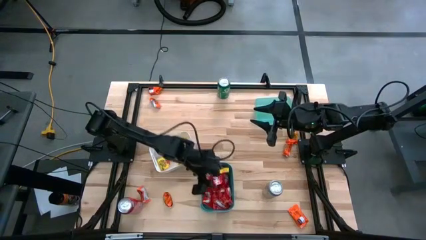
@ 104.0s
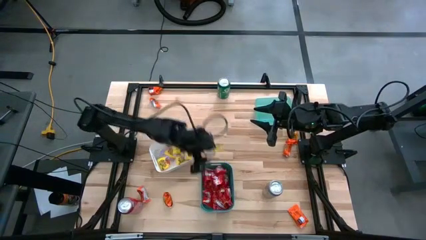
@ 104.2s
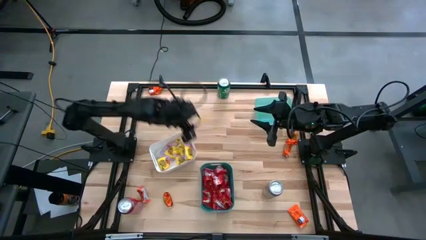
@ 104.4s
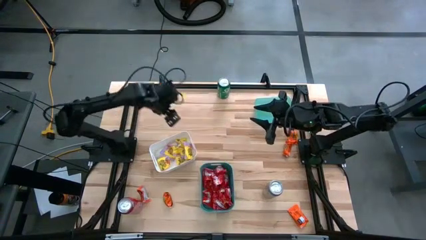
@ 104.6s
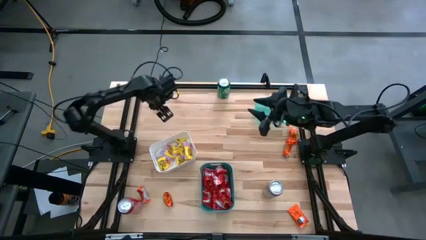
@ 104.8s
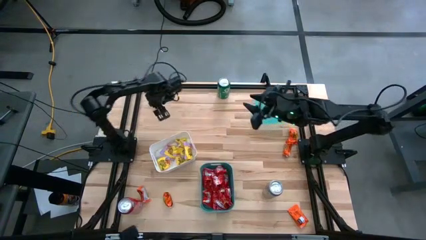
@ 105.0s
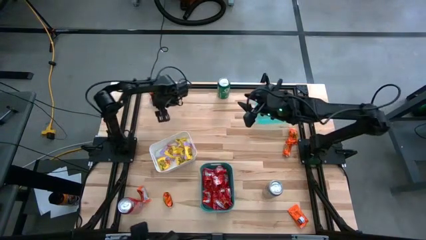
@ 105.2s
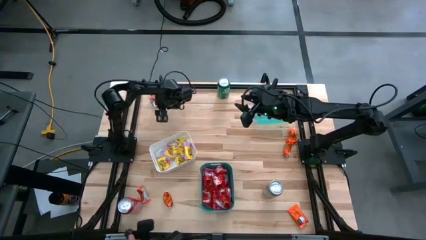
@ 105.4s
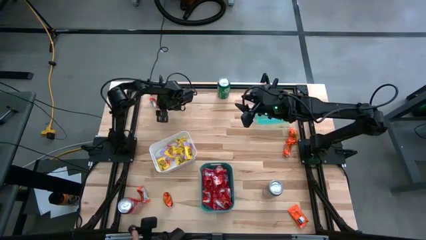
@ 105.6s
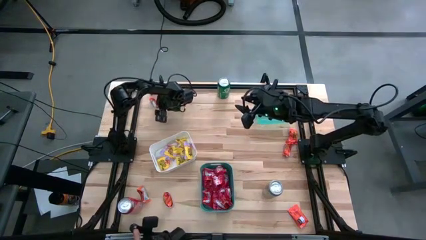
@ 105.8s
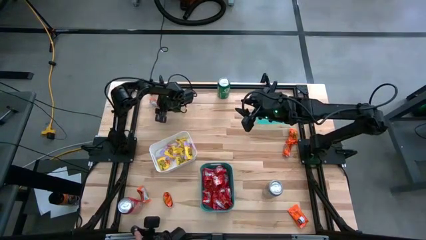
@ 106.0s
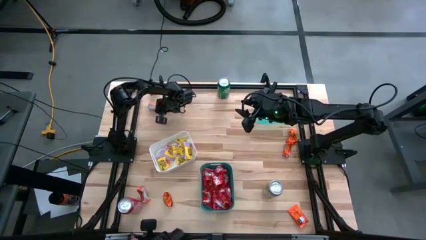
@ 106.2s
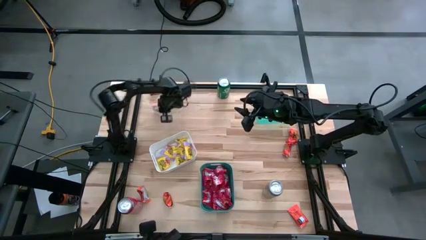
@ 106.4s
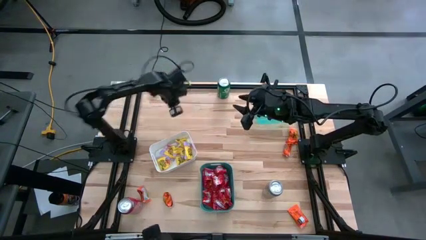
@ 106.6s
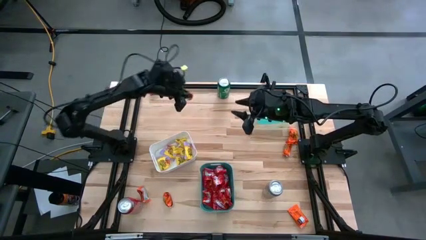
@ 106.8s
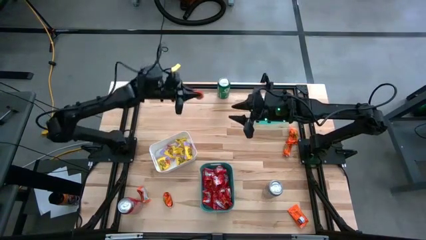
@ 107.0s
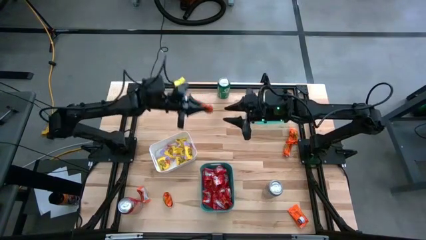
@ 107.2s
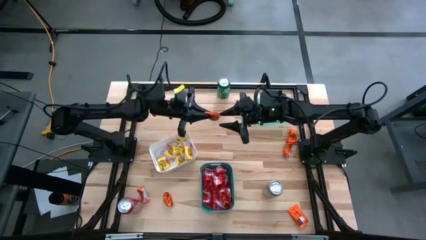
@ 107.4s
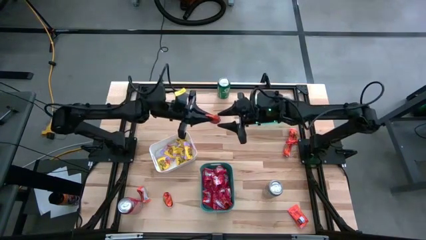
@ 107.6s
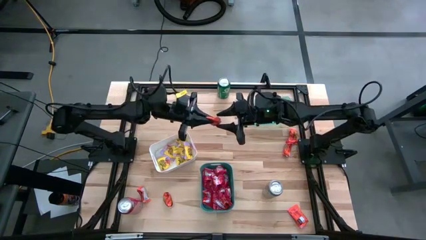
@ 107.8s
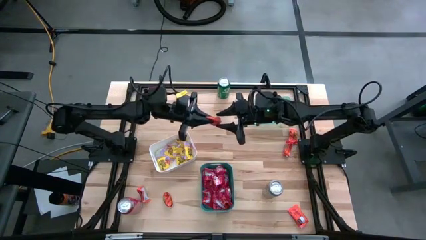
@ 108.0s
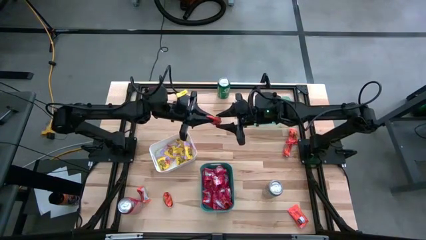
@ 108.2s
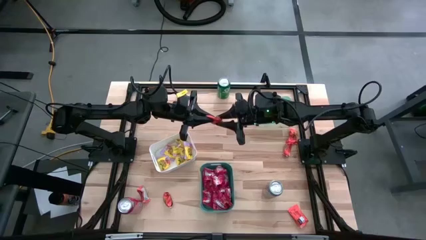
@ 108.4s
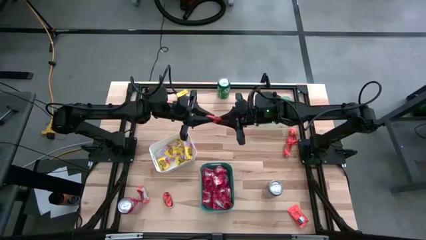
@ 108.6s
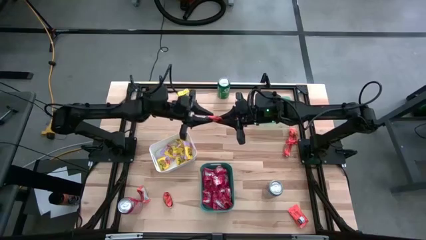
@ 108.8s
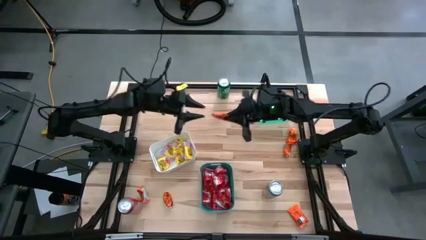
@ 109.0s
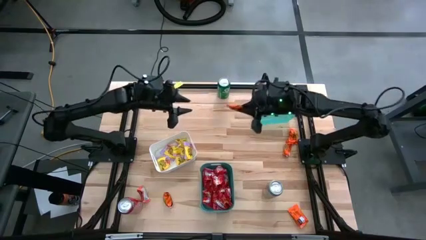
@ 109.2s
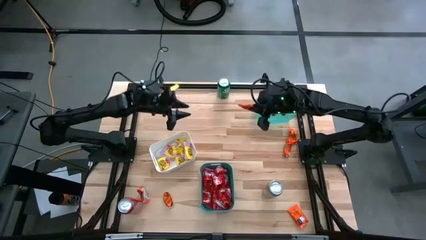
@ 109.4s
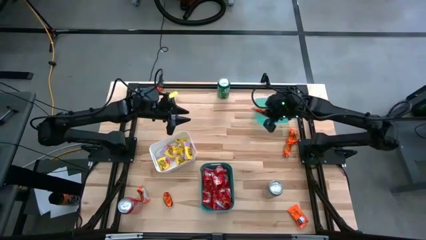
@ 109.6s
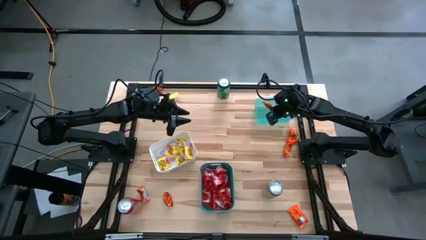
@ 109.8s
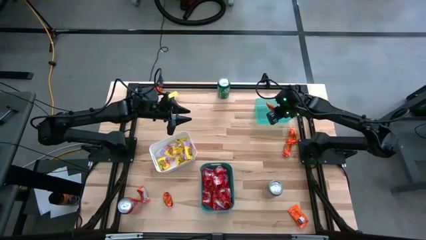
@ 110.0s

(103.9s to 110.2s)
Task: Sort candy
Put the orange chocolate into the transparent green bin

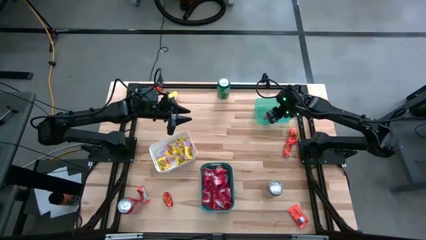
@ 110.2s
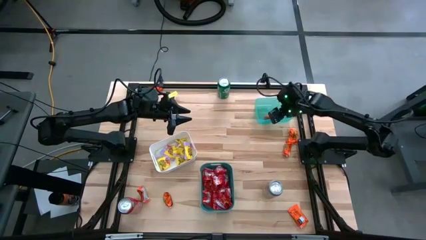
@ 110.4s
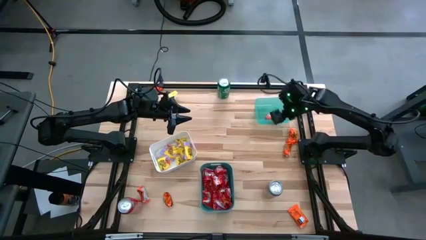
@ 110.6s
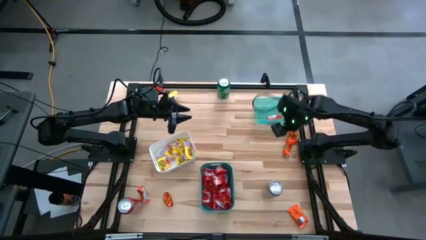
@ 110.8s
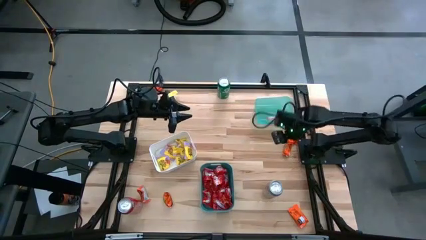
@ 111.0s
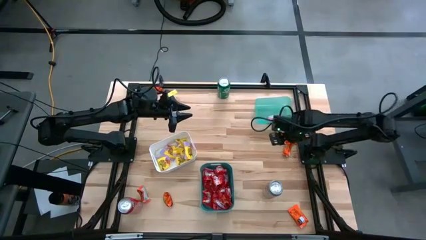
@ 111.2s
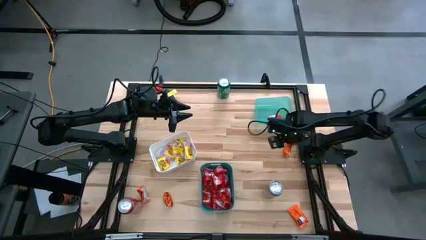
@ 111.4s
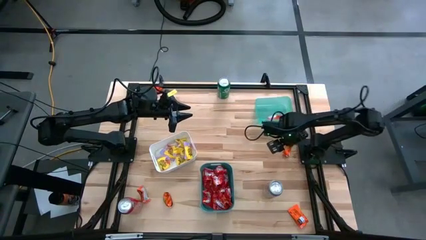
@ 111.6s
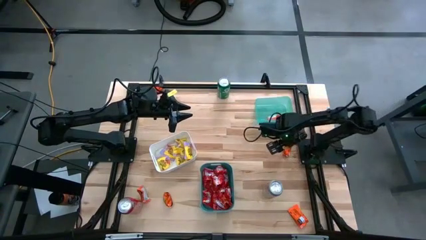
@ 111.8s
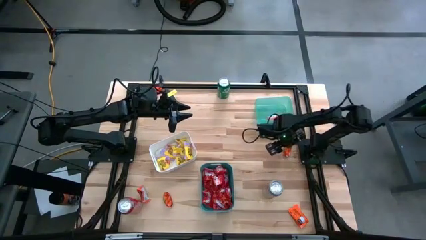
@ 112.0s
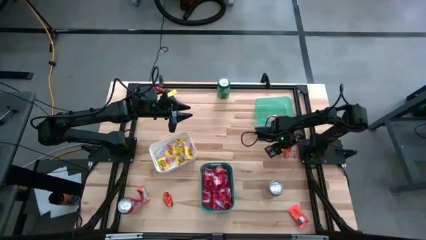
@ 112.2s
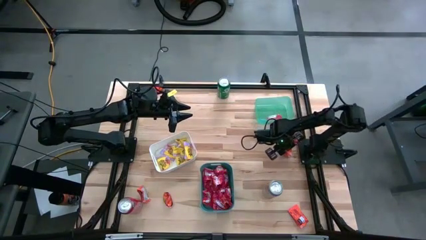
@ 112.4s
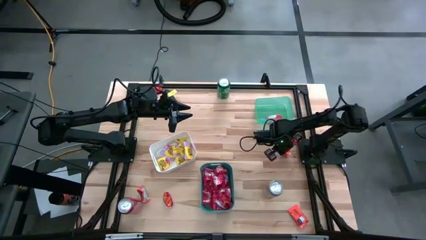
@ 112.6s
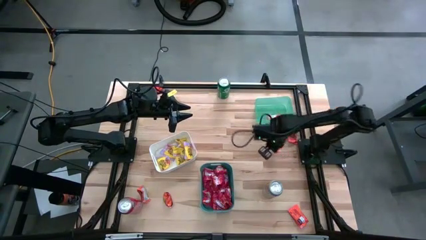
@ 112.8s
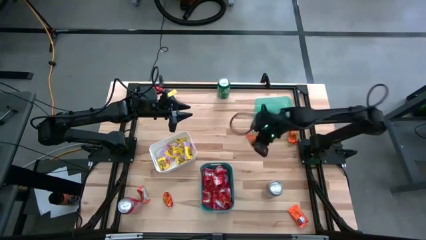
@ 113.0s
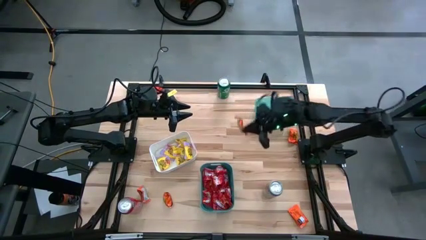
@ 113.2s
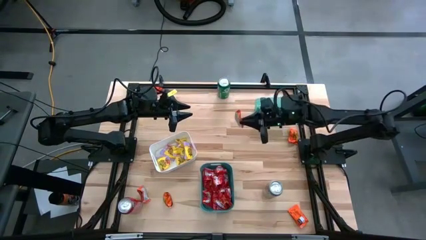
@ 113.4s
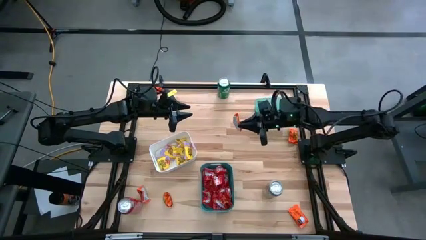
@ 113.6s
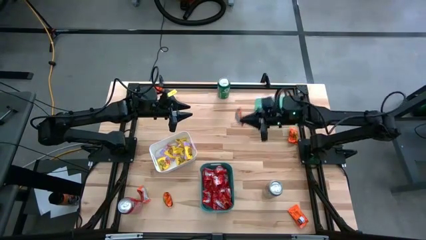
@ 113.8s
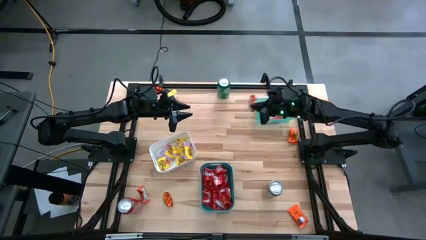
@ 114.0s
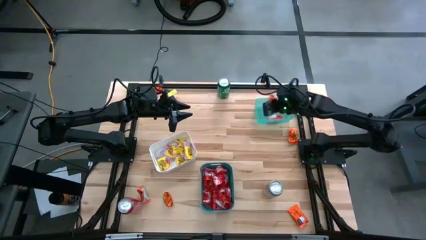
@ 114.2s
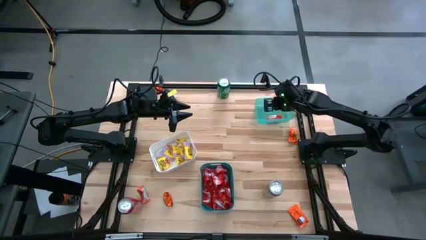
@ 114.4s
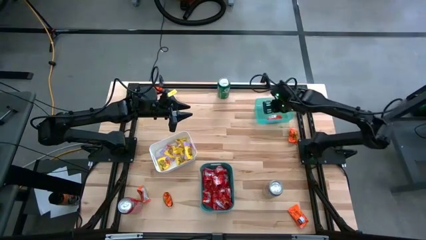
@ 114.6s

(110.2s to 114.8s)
Put the orange chocolate into the transparent green bin

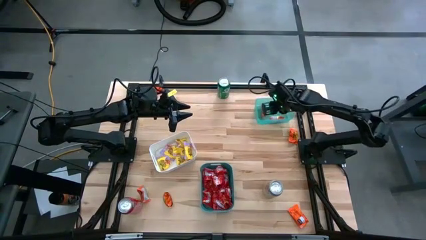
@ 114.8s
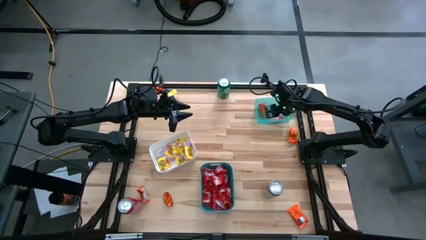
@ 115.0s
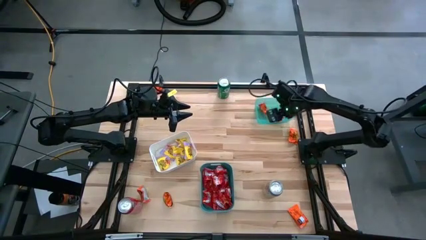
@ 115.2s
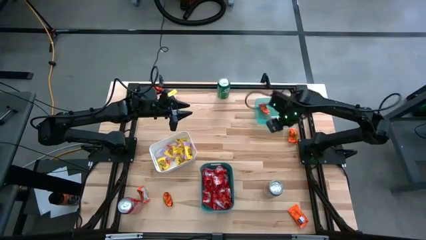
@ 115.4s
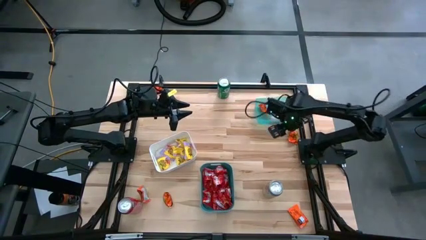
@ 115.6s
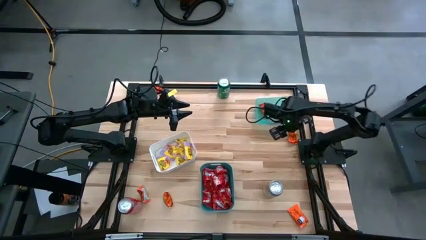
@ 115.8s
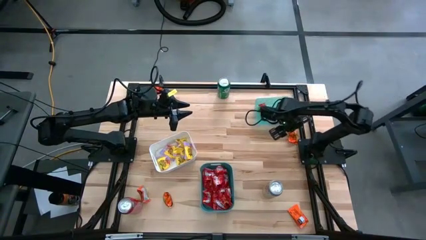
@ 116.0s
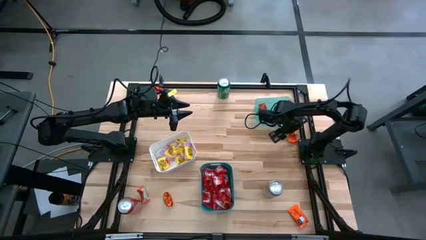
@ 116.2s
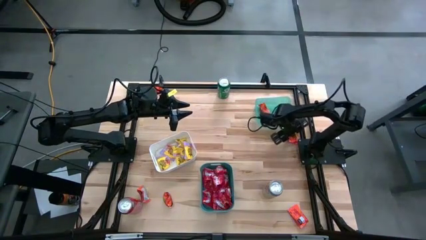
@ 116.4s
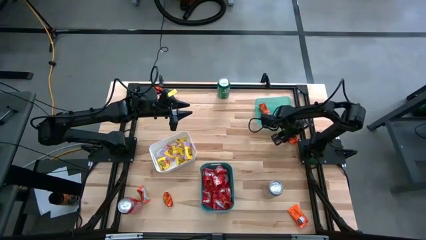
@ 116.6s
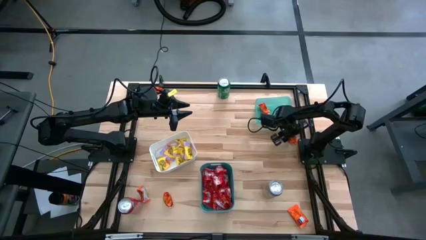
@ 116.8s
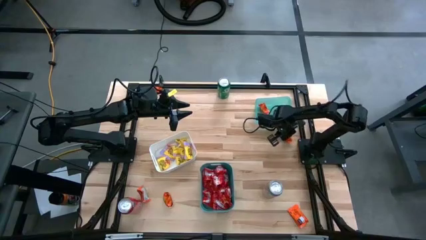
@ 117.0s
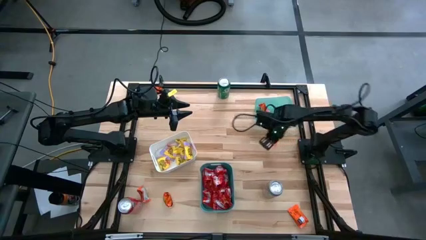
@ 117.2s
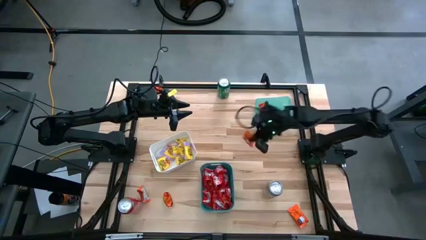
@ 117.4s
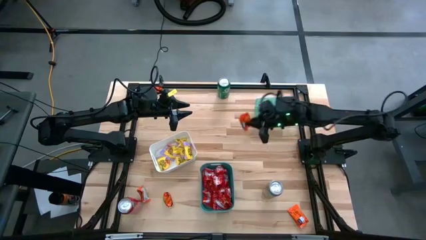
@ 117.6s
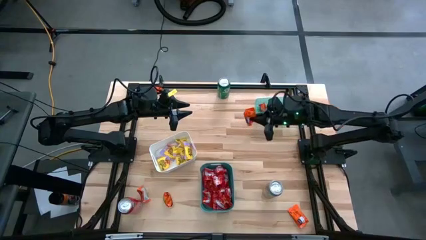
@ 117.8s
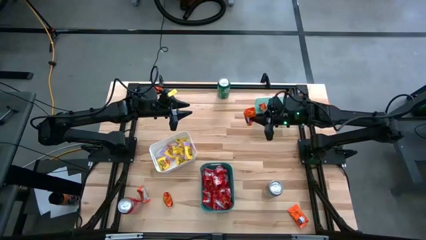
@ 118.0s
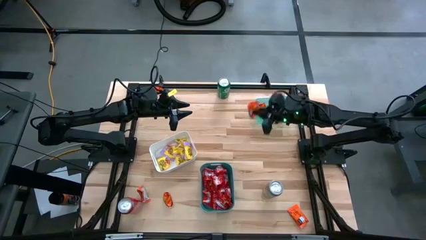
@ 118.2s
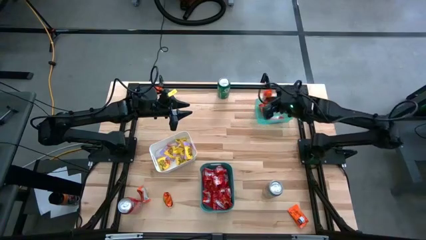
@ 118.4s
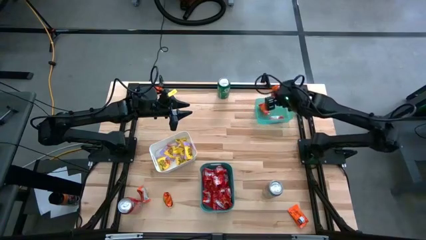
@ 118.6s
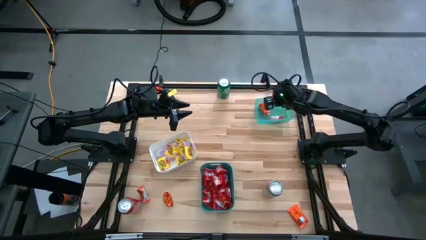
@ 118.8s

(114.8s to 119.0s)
Put the orange chocolate into the transparent green bin
